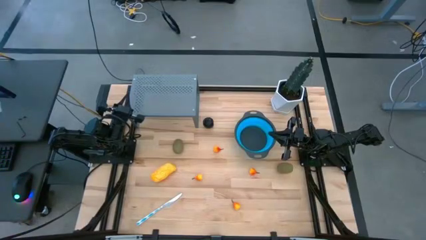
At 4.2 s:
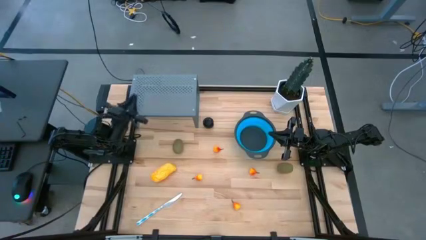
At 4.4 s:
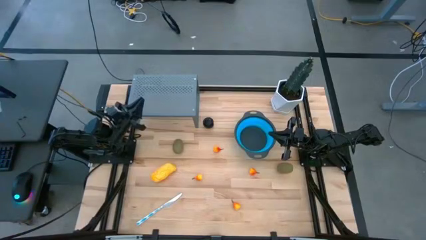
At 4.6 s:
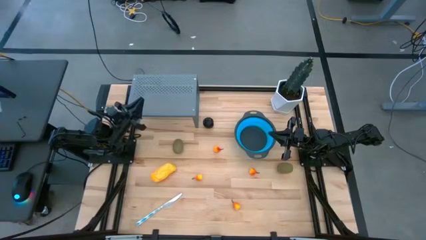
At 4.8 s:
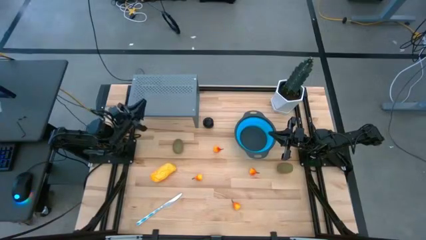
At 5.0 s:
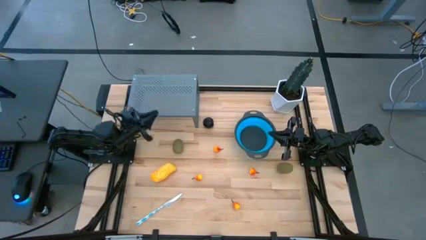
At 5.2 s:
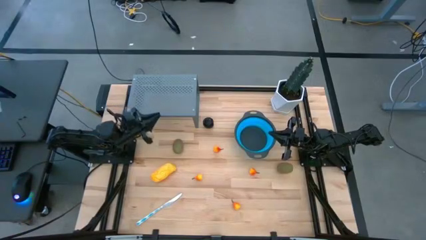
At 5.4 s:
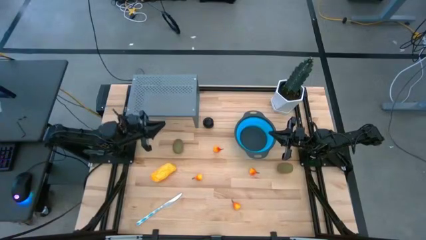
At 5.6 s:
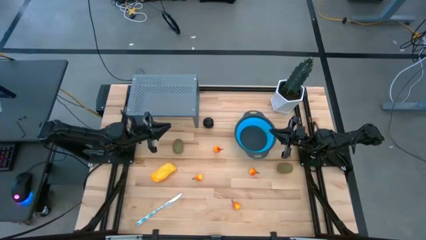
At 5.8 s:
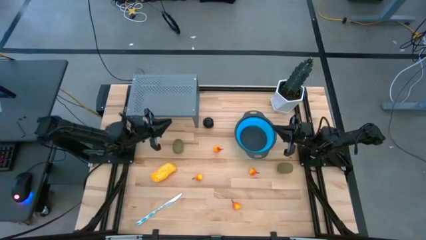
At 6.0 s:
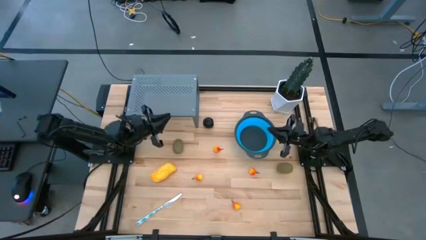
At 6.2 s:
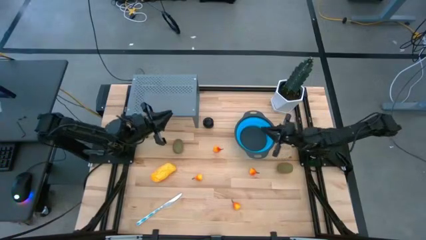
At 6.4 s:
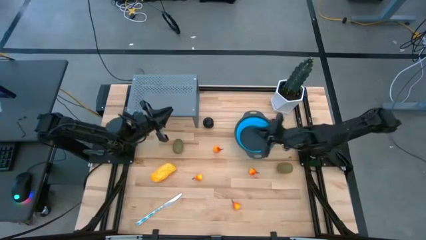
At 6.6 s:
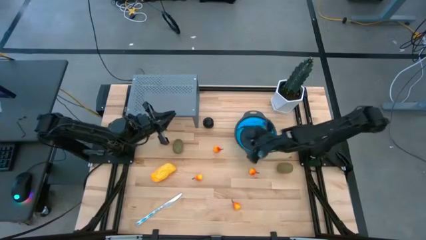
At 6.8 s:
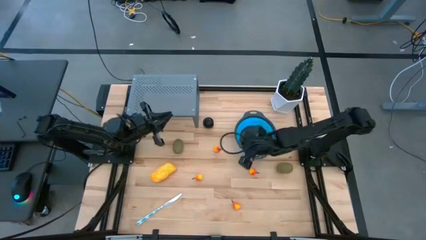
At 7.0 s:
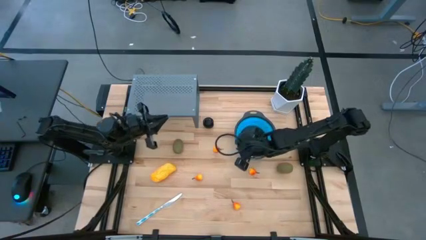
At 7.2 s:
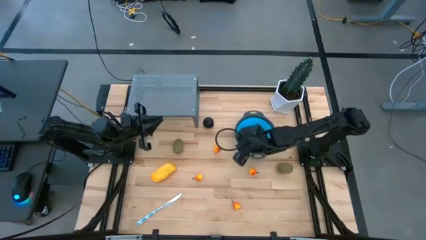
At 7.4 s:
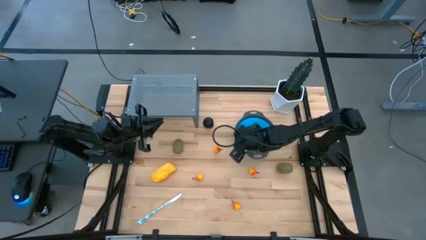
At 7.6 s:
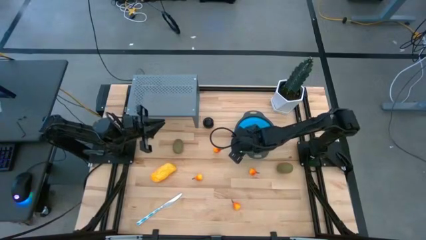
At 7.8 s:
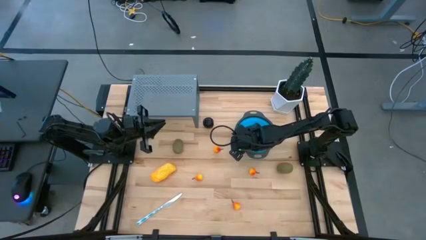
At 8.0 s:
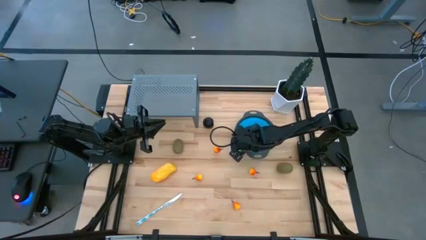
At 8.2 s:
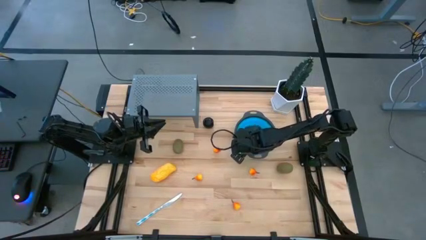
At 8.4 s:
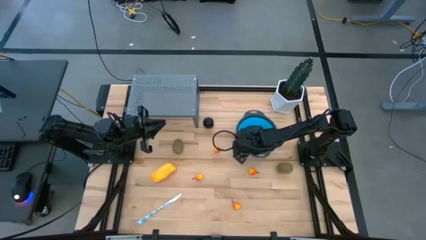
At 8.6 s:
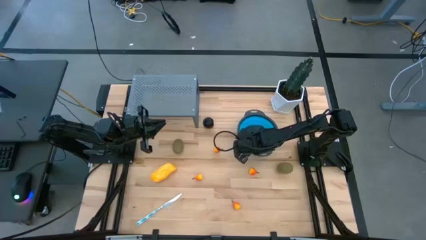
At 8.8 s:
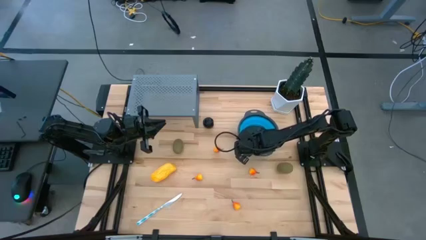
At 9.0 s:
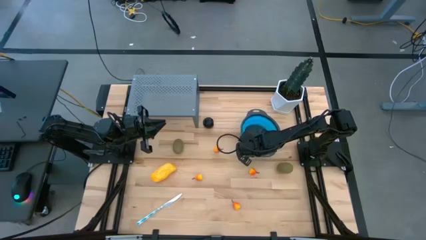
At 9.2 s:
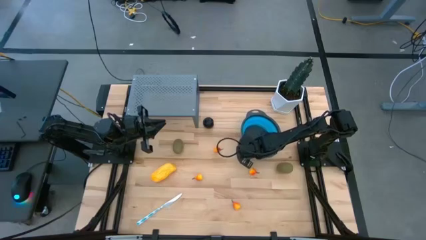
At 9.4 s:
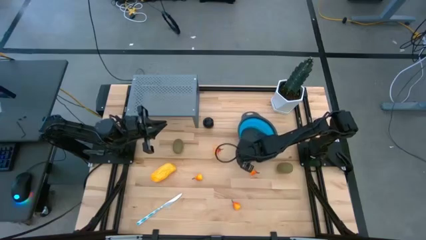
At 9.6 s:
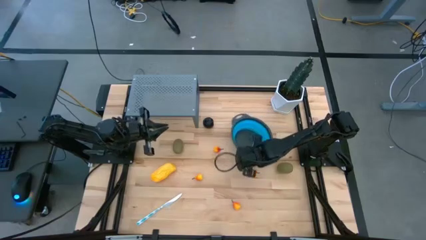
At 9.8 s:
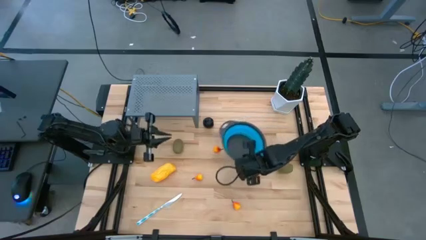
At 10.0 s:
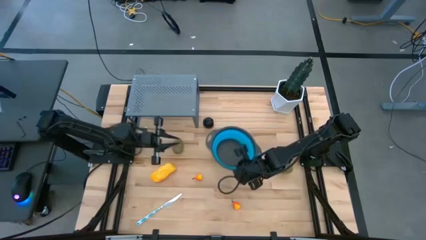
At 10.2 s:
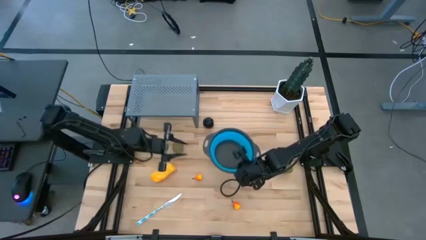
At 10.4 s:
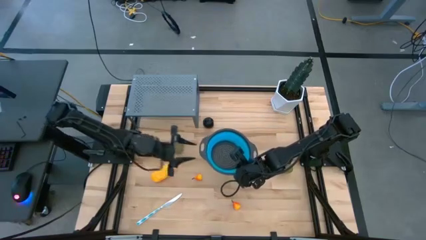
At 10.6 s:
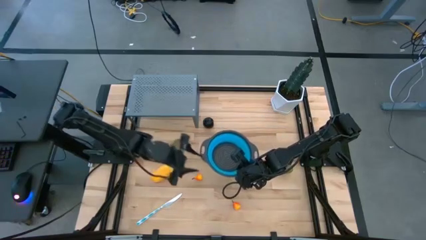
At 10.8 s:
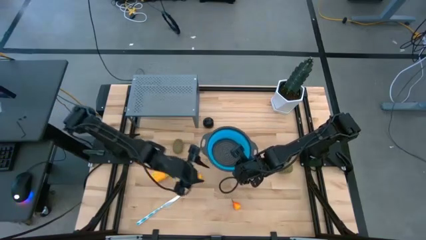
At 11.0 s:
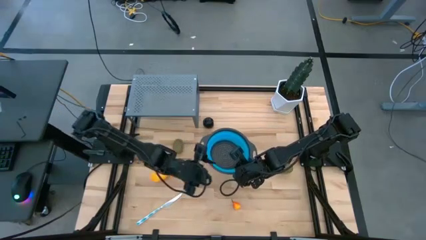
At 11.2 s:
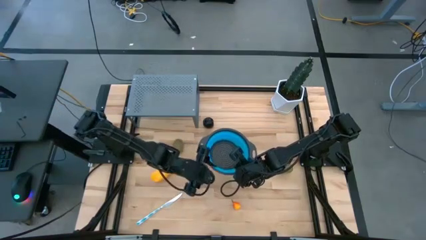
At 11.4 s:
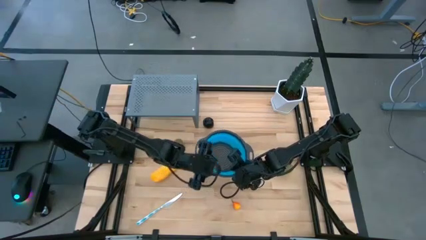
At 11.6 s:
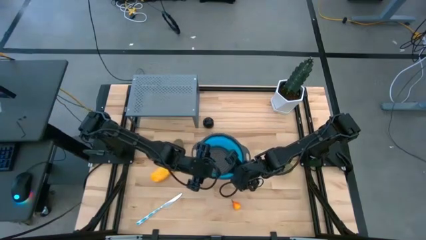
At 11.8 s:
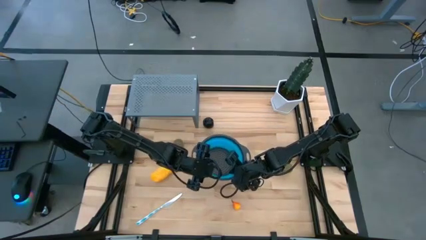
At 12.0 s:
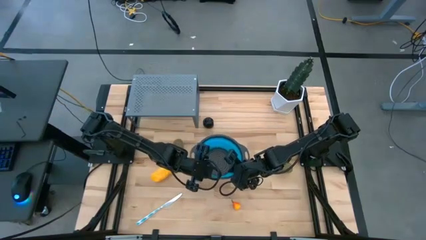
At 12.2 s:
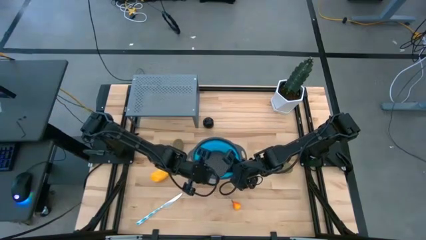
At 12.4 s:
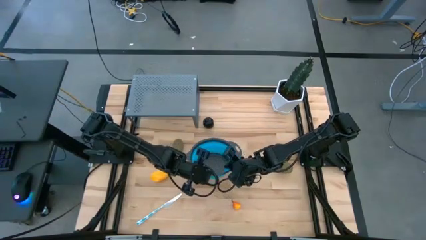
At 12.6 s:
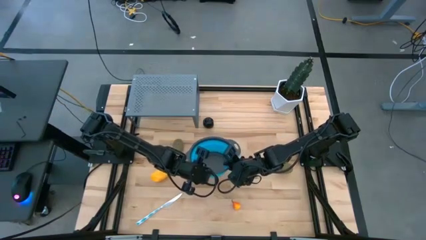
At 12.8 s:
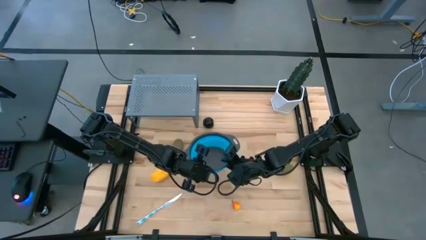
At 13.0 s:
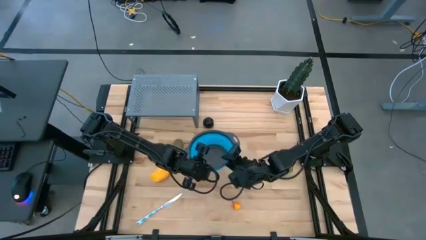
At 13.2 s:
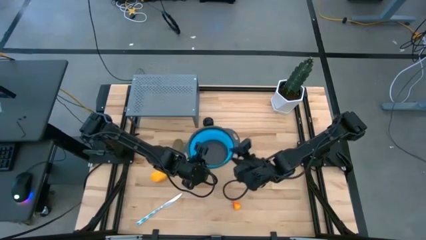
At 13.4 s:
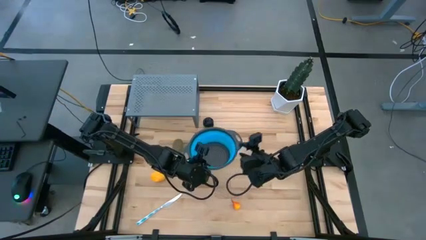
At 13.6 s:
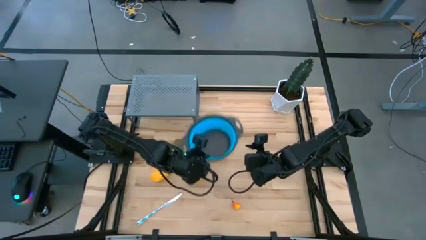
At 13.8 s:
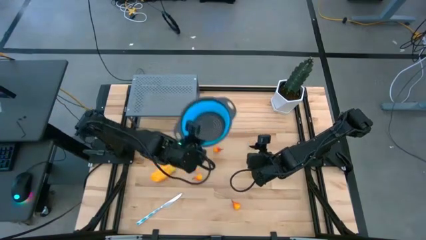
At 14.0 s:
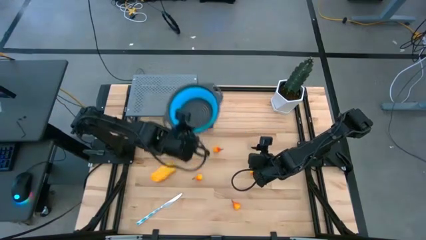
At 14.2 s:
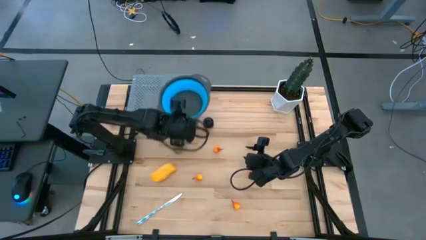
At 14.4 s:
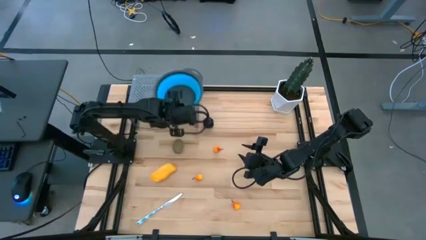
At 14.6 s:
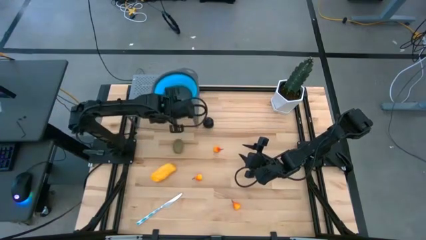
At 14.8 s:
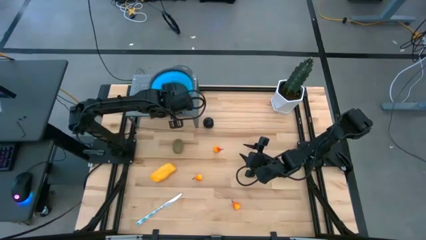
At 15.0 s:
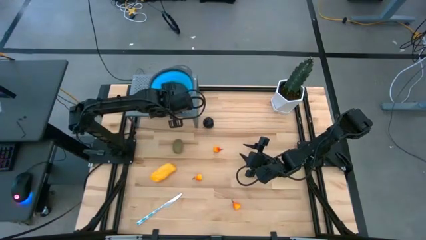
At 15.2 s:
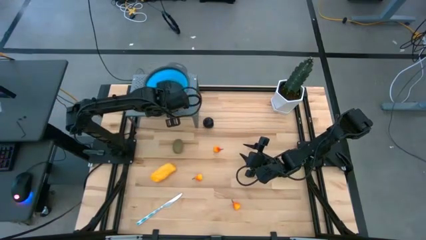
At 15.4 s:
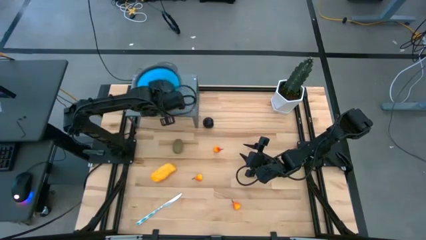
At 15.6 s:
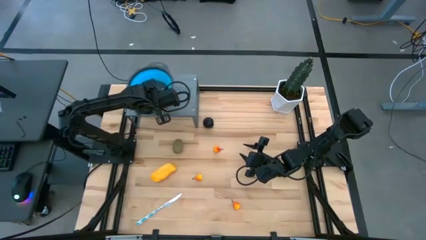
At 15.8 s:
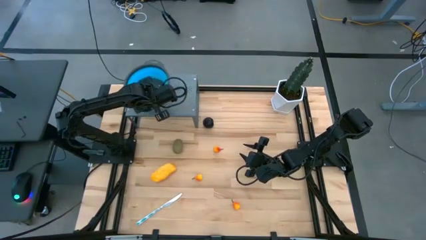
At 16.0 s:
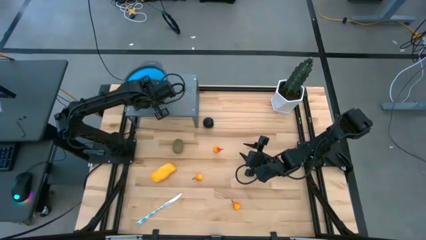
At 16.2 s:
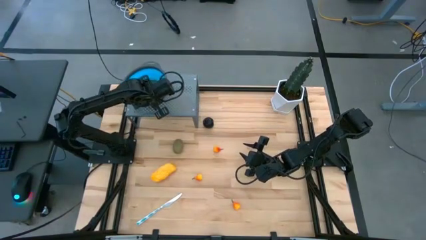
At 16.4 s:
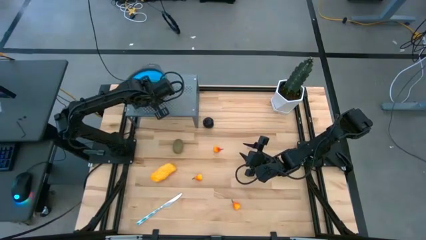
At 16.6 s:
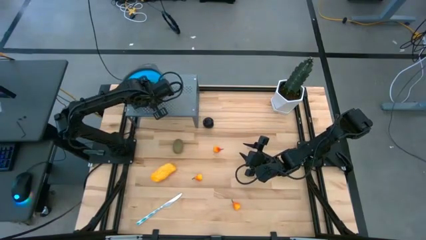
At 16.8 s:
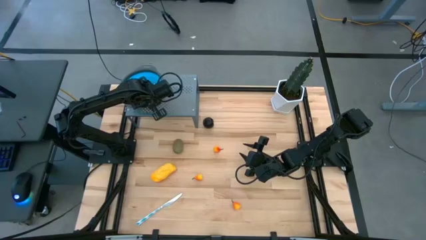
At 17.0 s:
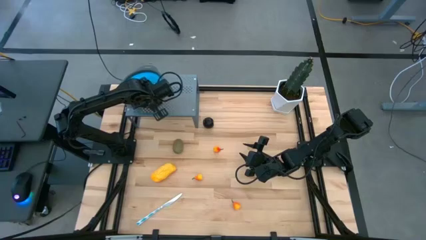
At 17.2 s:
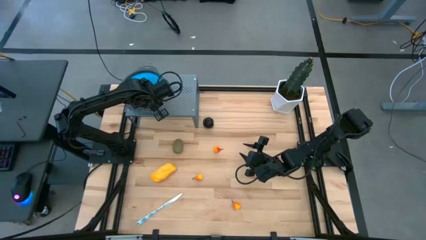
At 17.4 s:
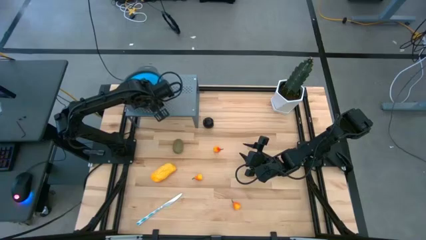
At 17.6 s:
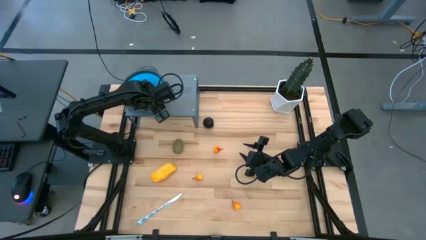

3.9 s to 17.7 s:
Task: Pick & Place Fruit
Put the blue strainer bowl on the shelf
